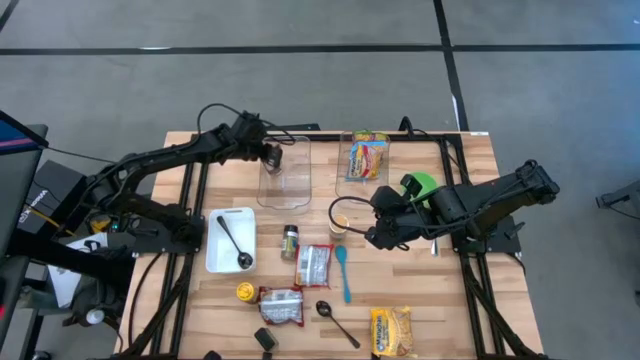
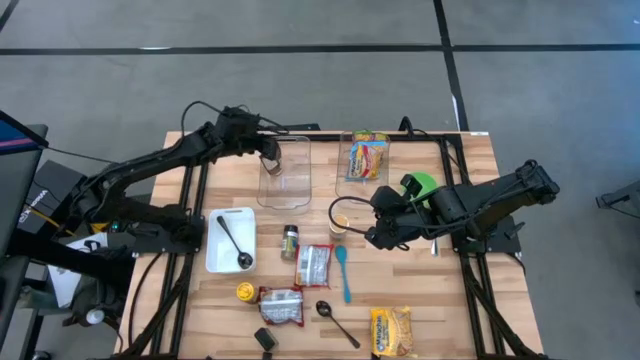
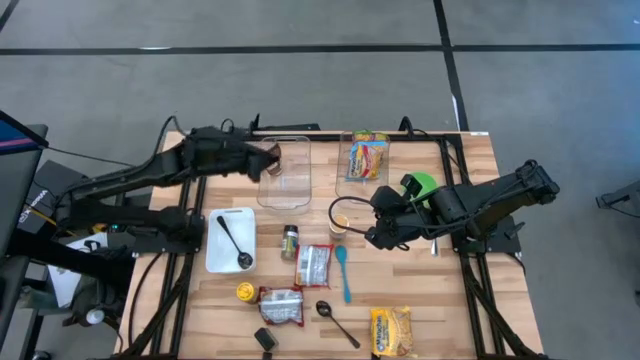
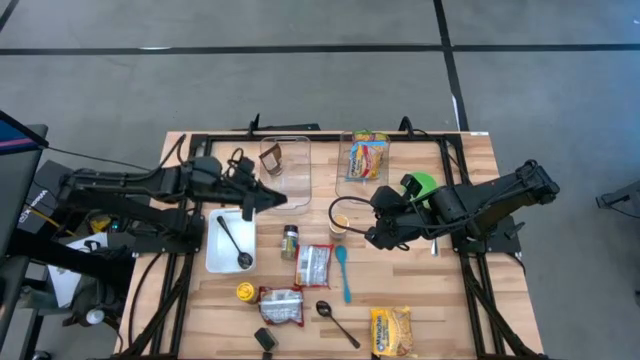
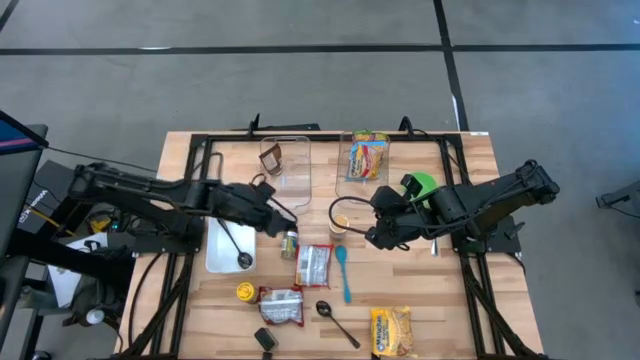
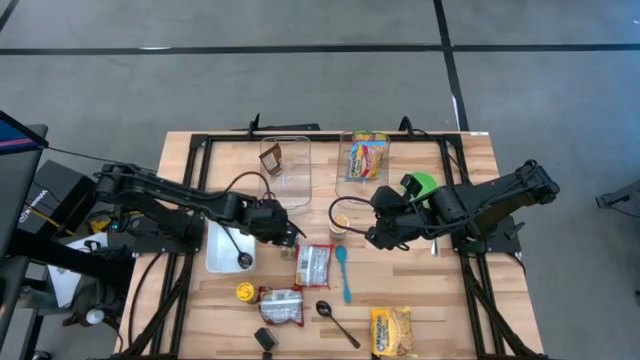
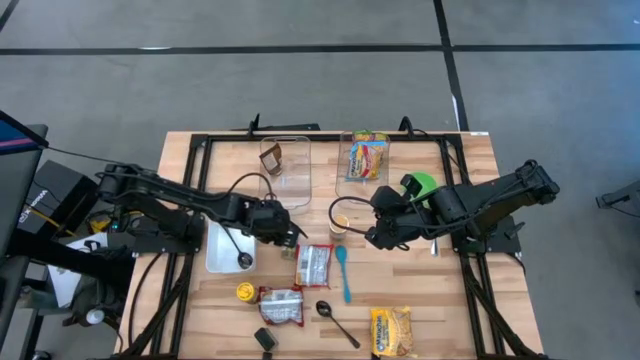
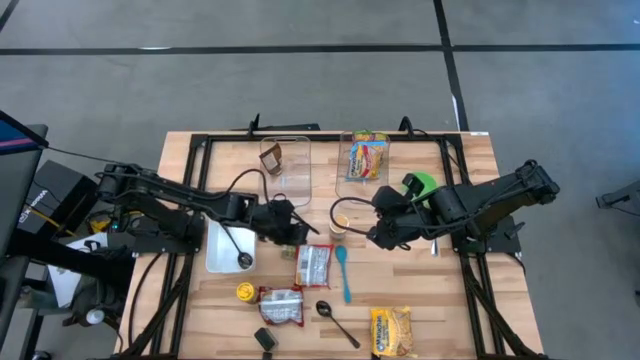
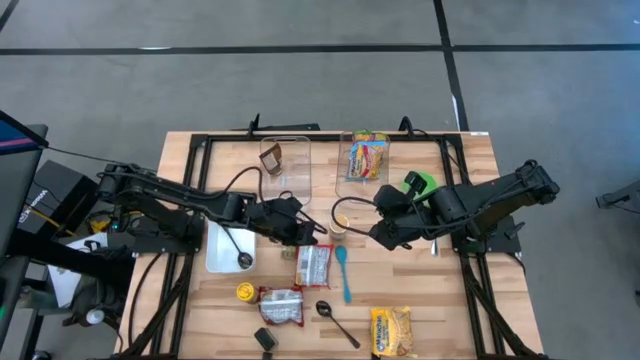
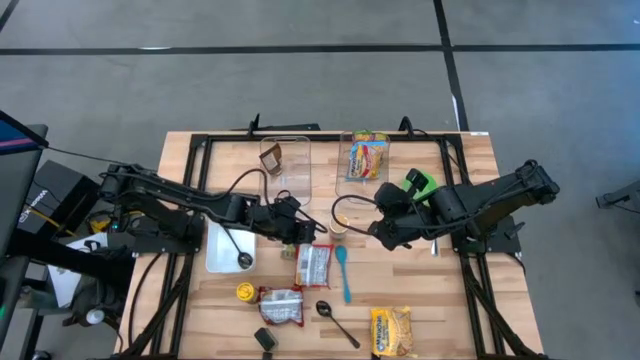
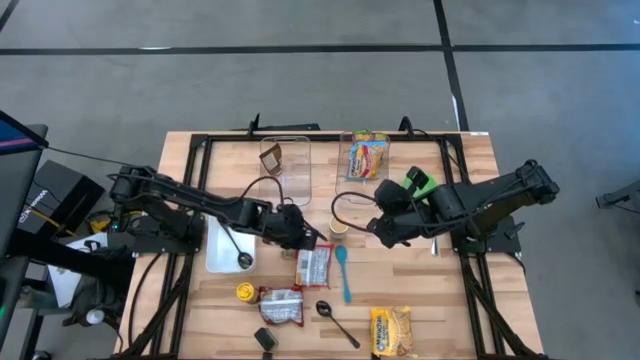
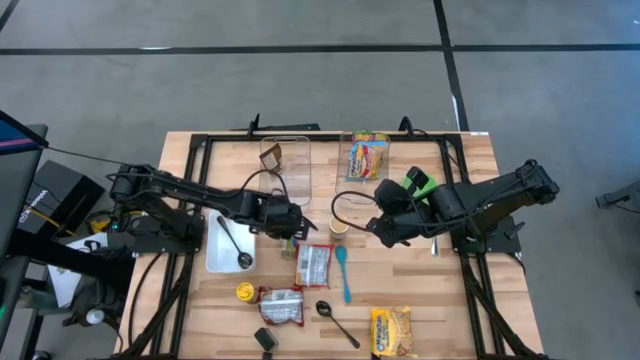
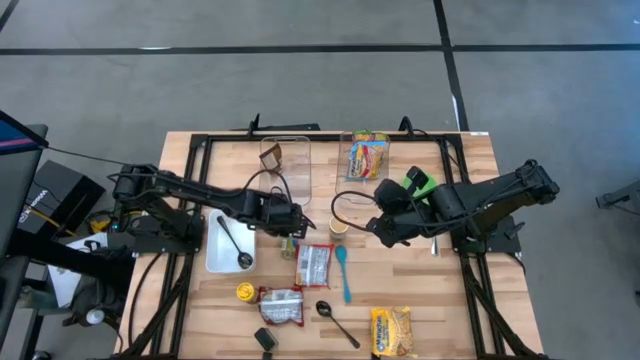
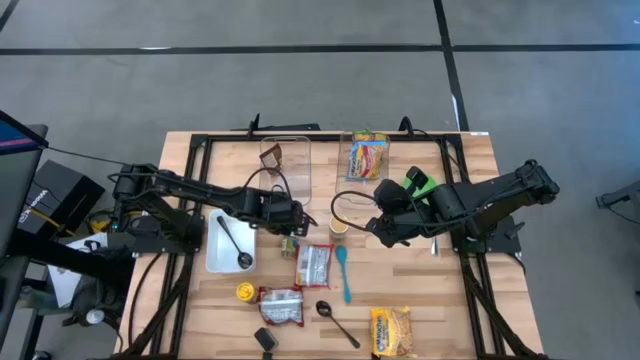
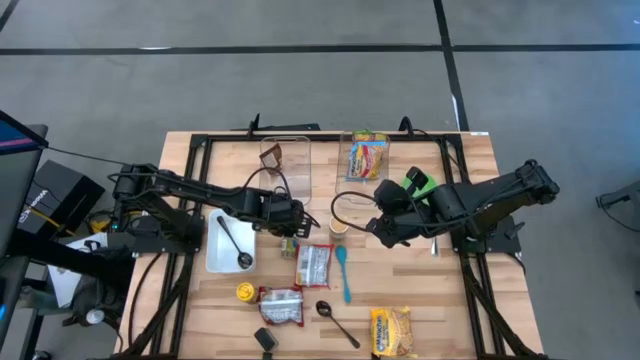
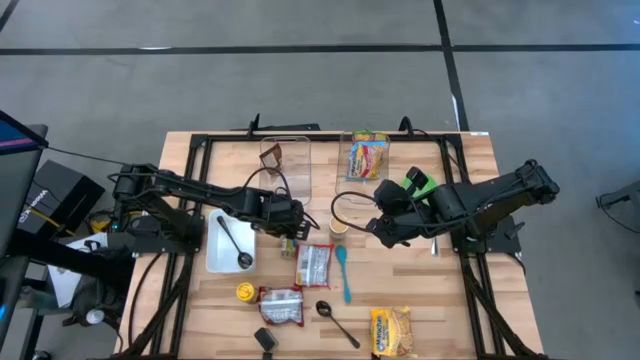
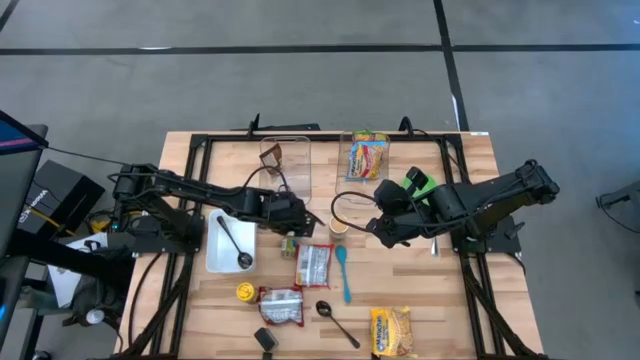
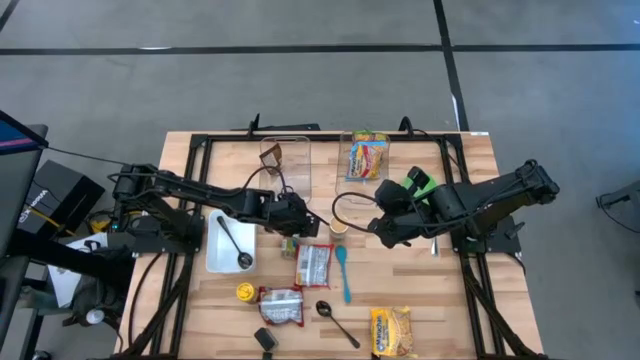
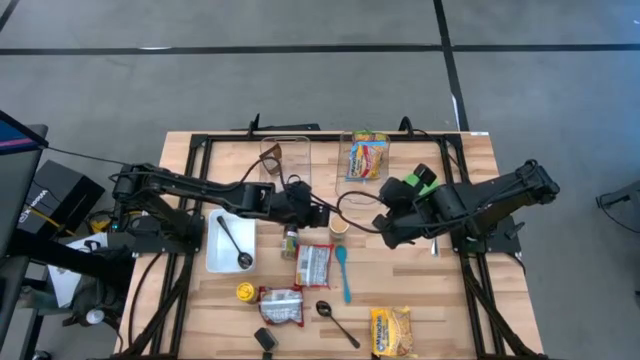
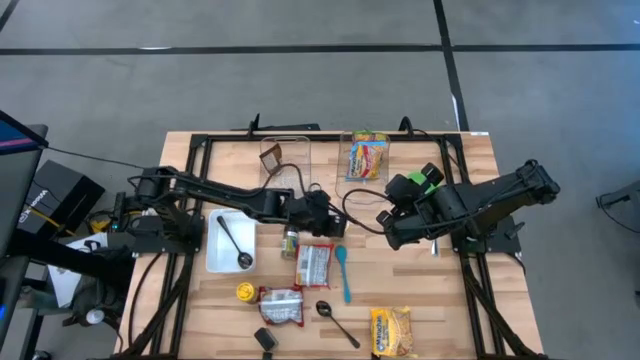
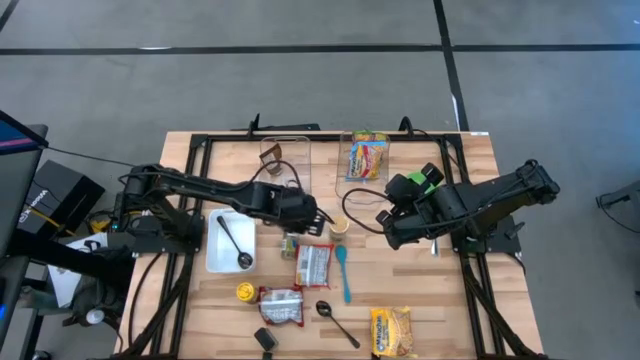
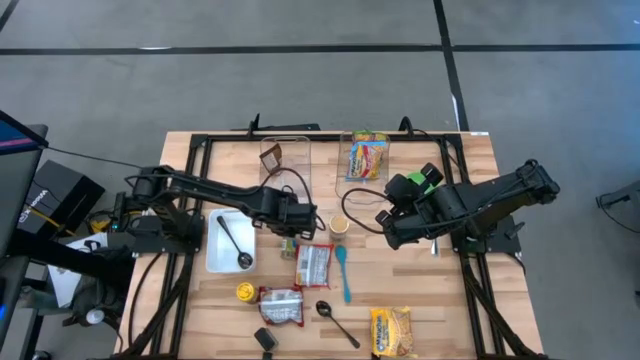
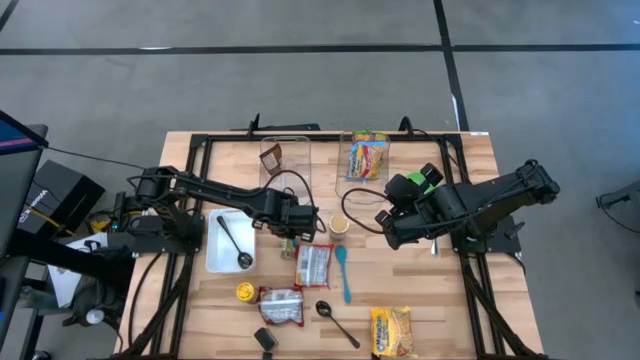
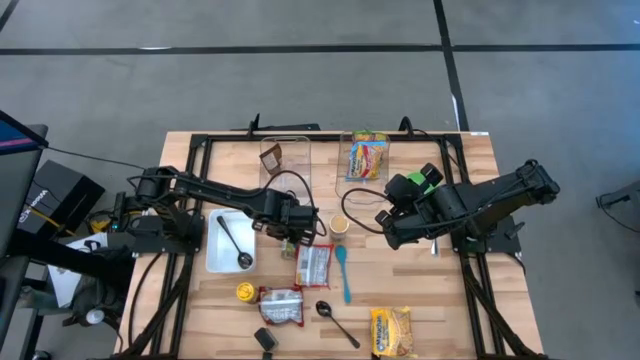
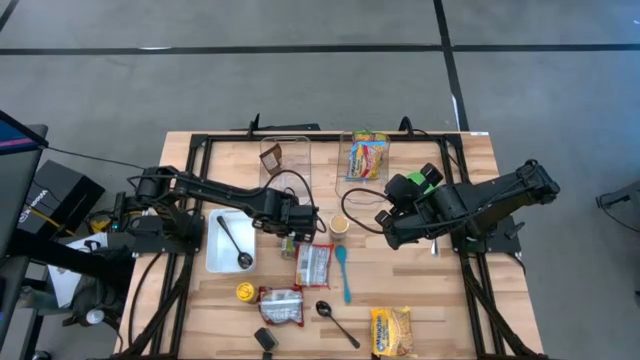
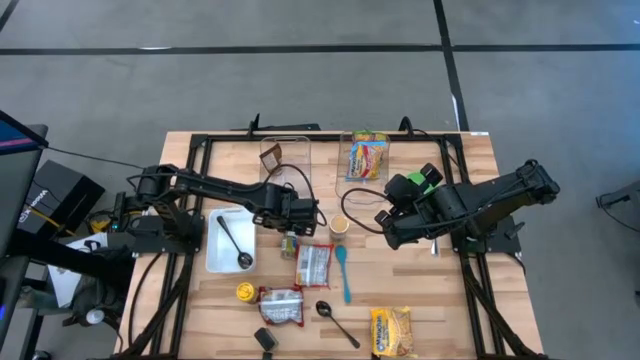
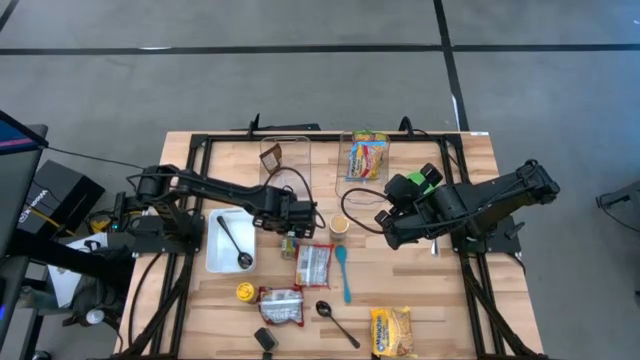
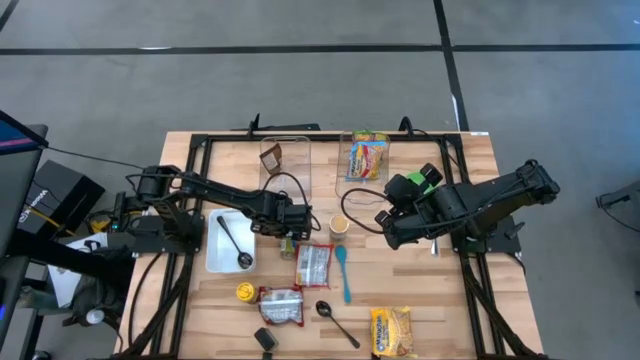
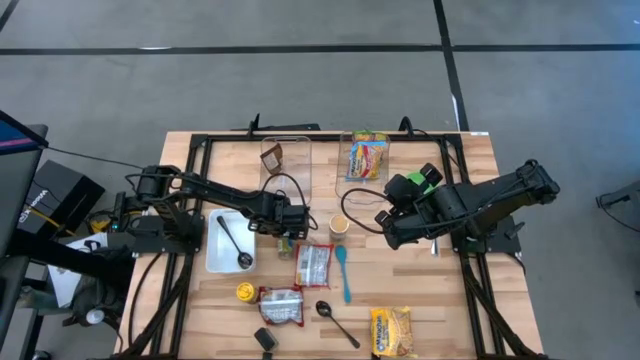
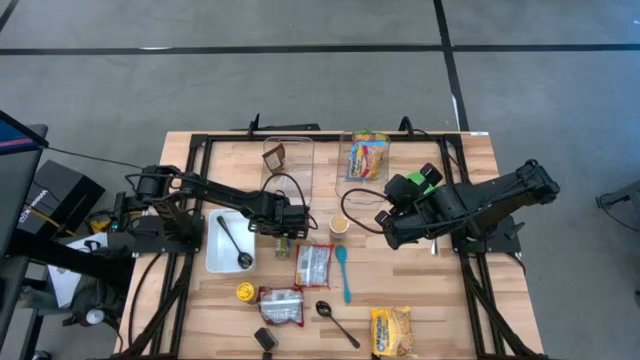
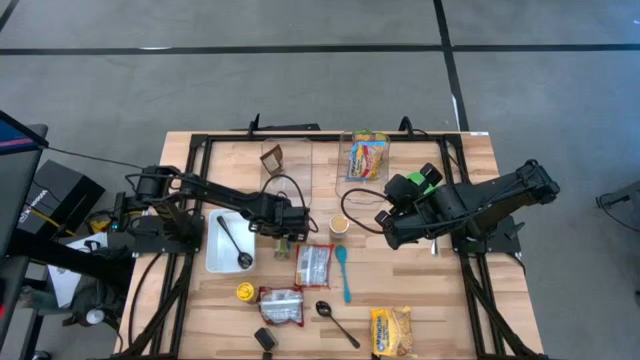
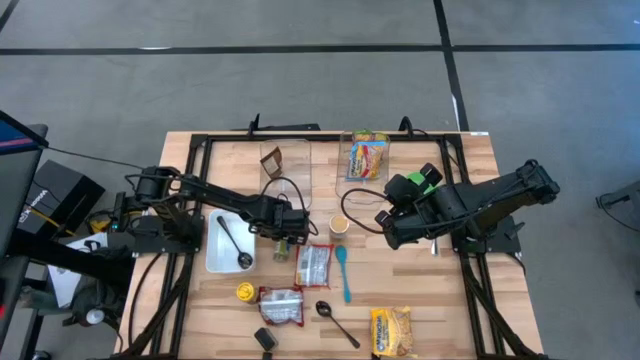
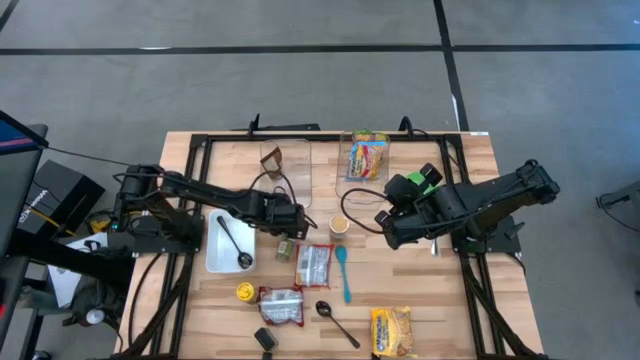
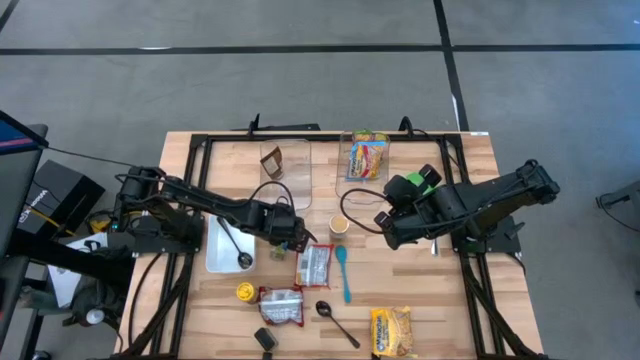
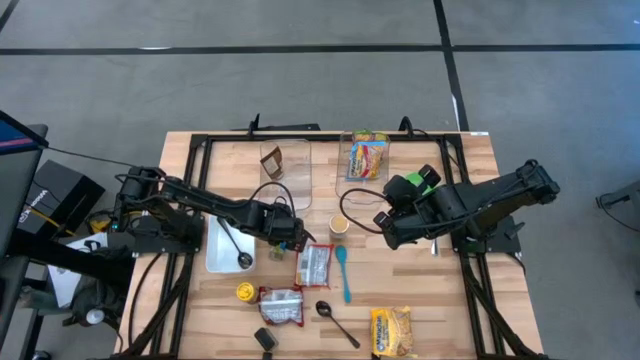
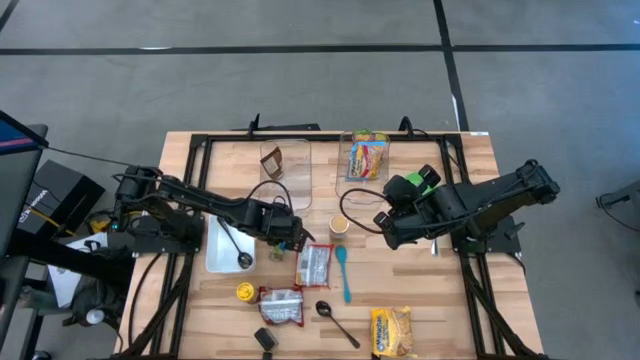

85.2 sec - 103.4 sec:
Task: Pick & Place Food Item
Put the light green seasoning bottle into the left transparent bin

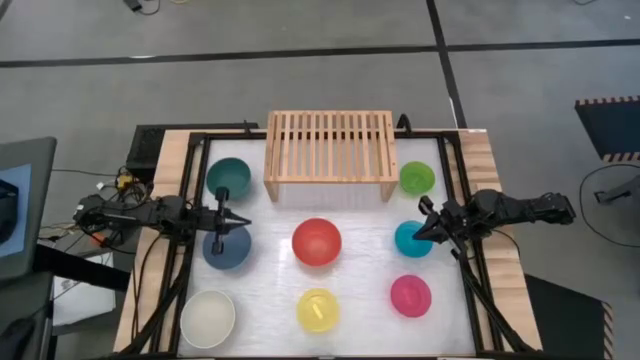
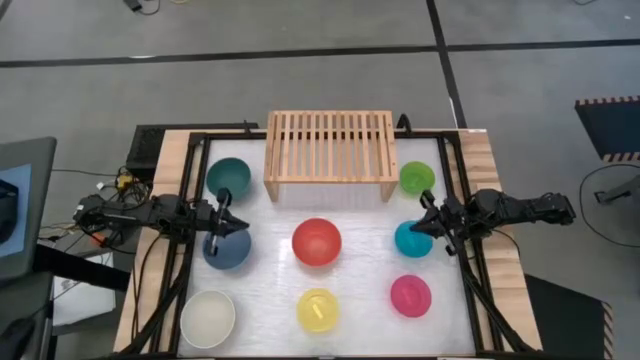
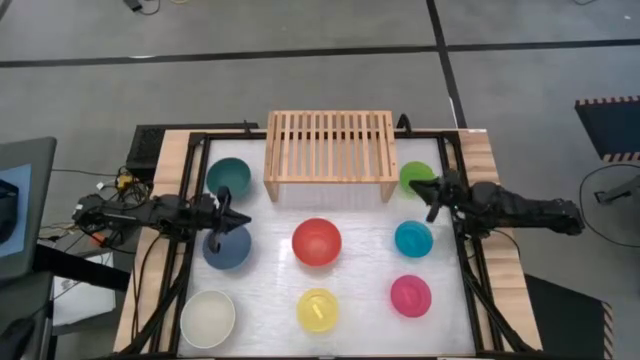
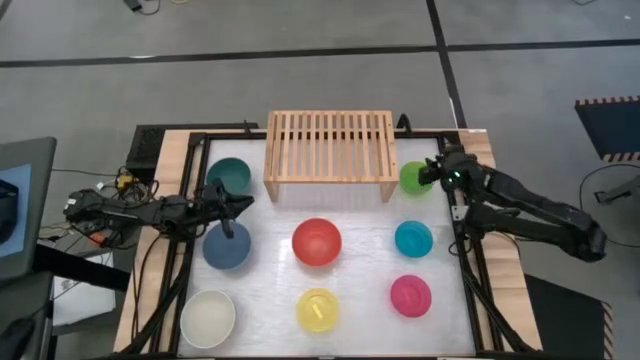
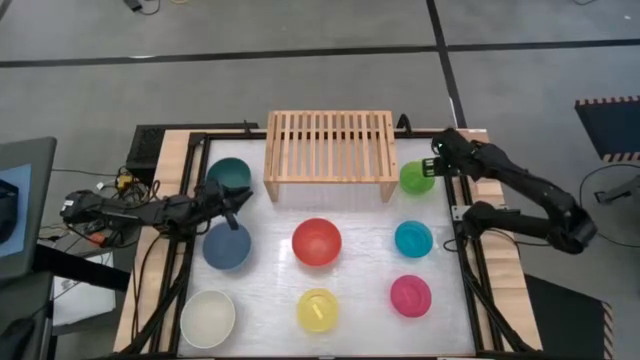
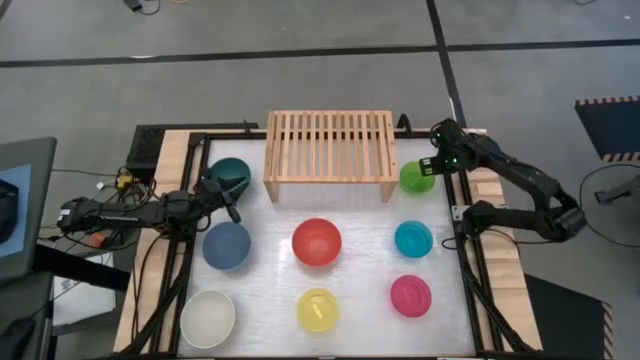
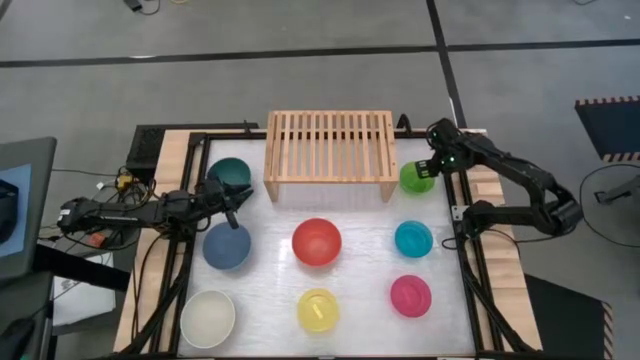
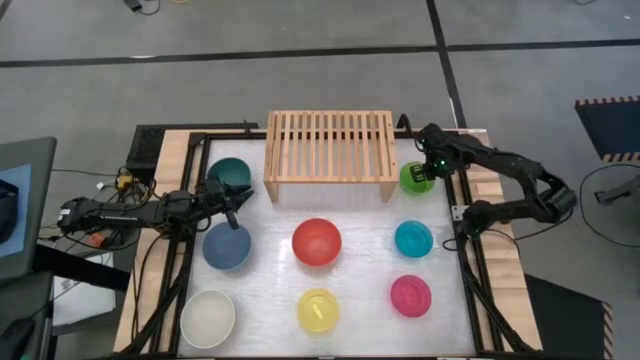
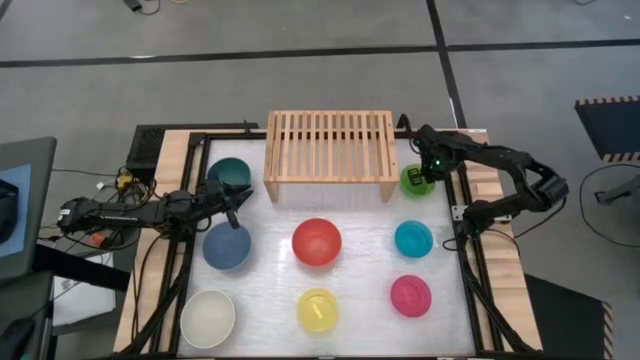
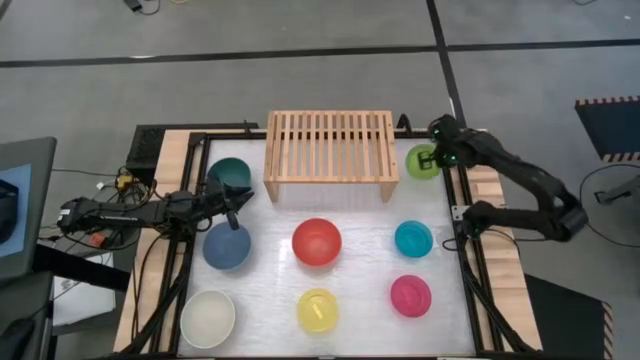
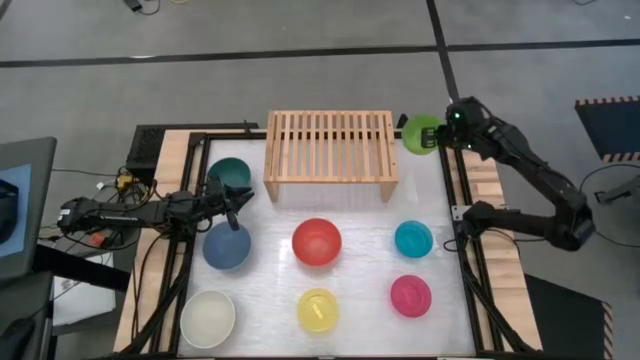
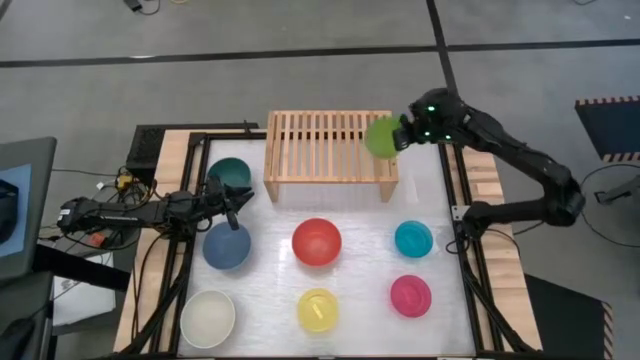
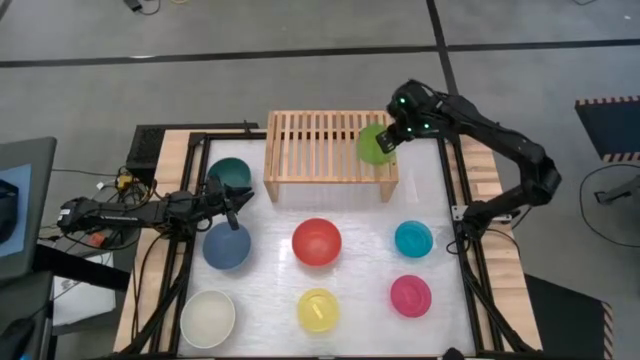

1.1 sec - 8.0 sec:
Task: Place and stack bowls onto a shelf
Put the light green bowl on the shelf
